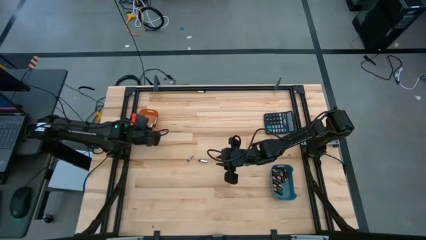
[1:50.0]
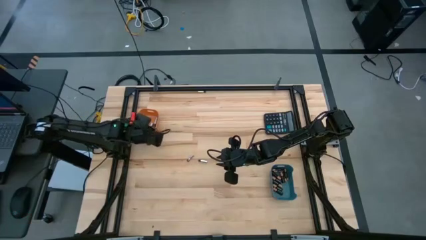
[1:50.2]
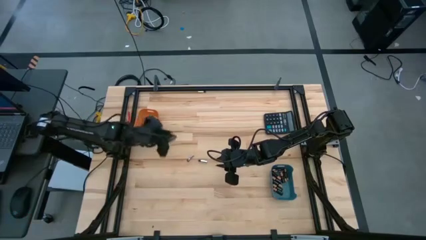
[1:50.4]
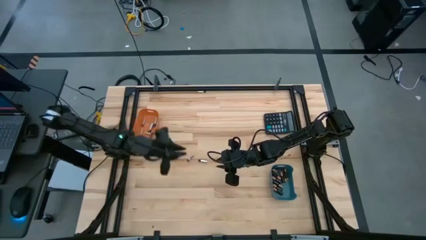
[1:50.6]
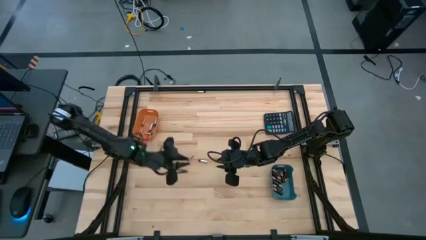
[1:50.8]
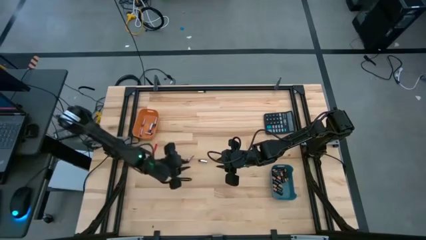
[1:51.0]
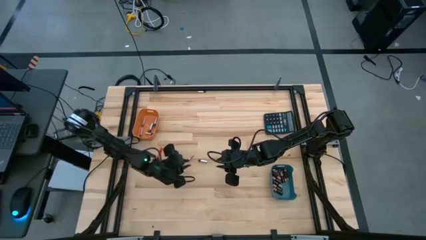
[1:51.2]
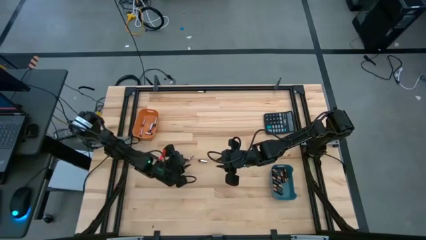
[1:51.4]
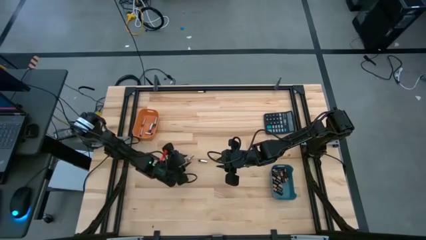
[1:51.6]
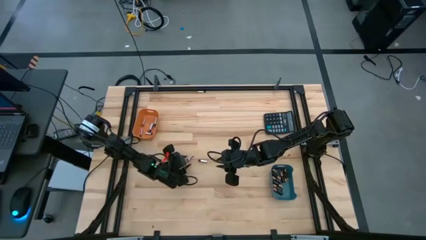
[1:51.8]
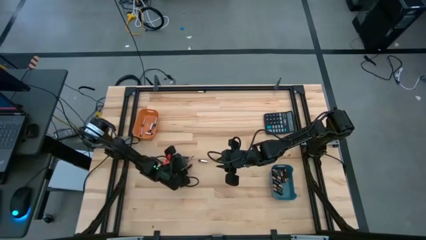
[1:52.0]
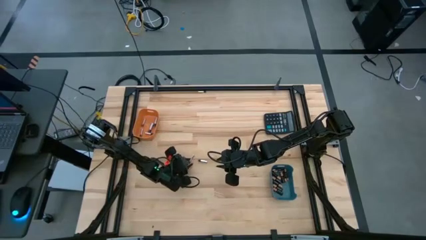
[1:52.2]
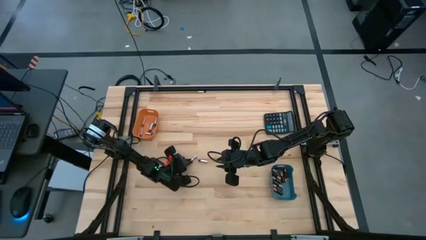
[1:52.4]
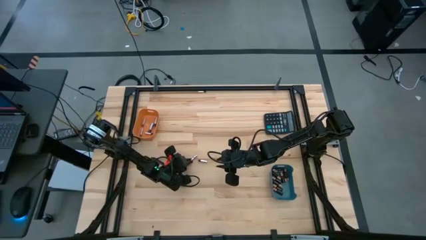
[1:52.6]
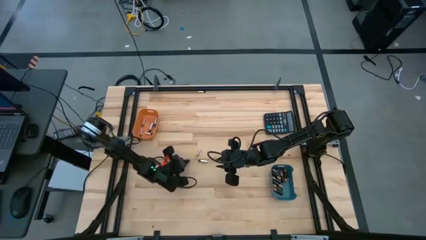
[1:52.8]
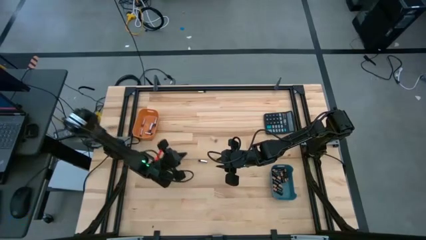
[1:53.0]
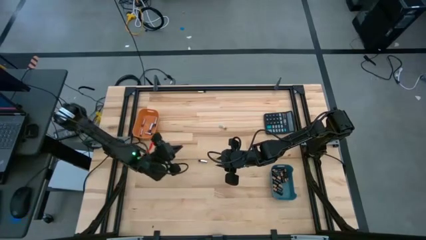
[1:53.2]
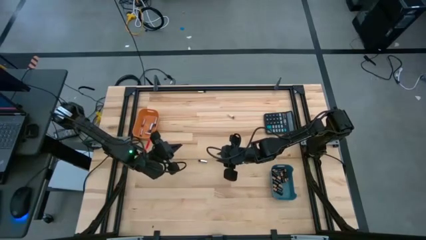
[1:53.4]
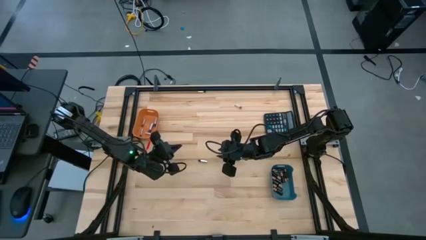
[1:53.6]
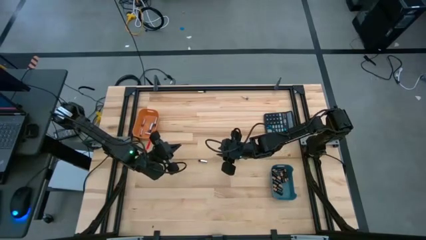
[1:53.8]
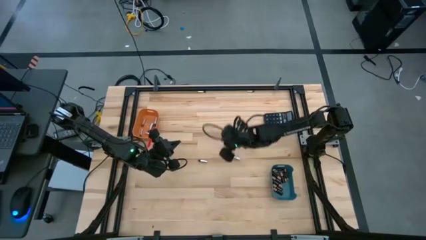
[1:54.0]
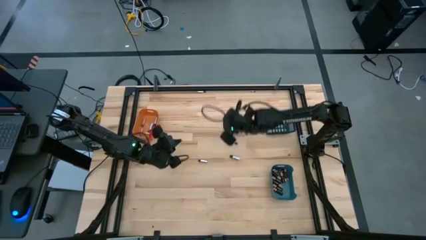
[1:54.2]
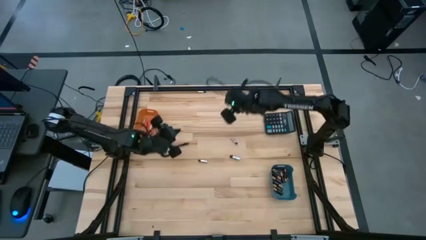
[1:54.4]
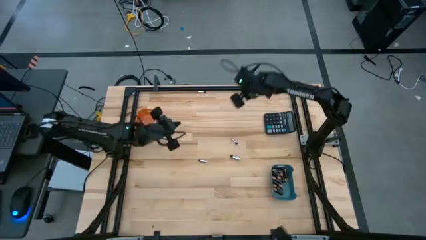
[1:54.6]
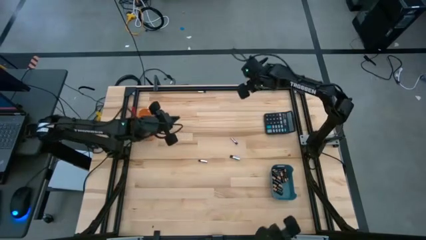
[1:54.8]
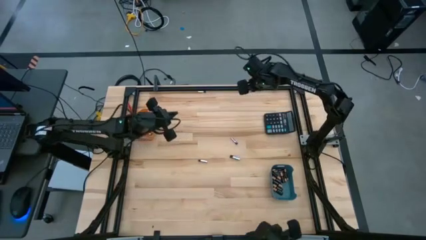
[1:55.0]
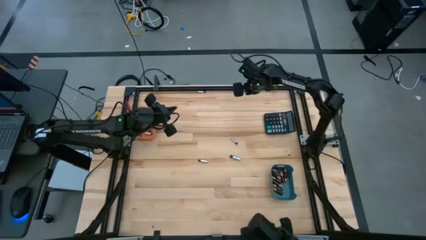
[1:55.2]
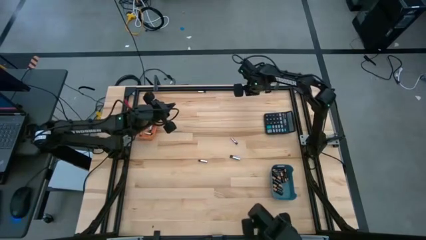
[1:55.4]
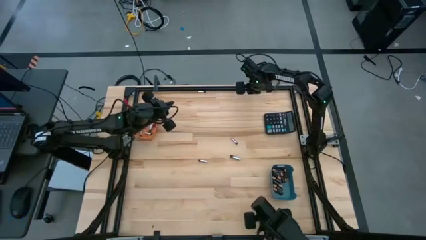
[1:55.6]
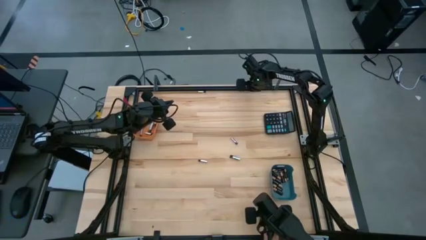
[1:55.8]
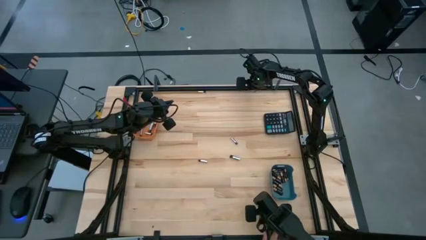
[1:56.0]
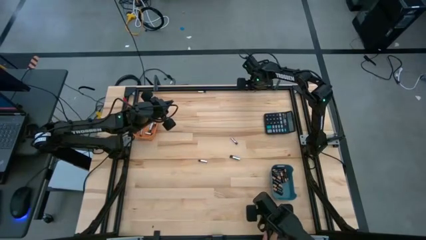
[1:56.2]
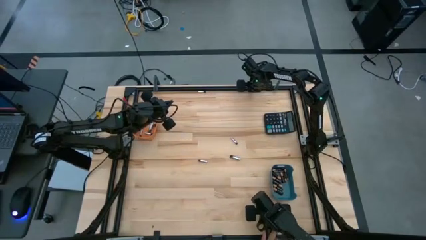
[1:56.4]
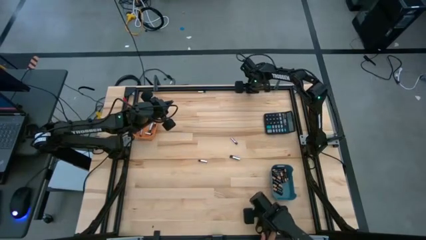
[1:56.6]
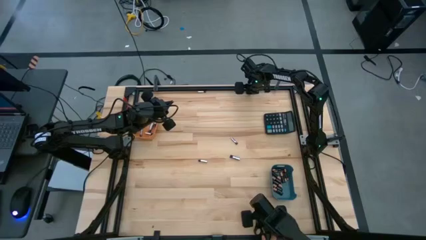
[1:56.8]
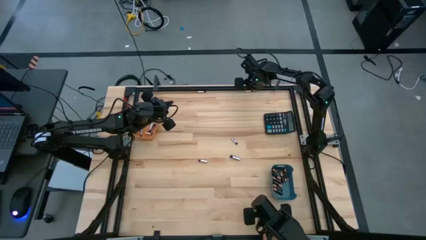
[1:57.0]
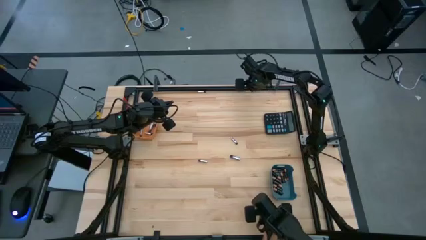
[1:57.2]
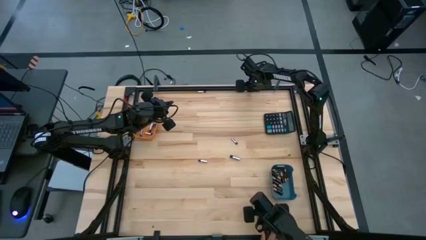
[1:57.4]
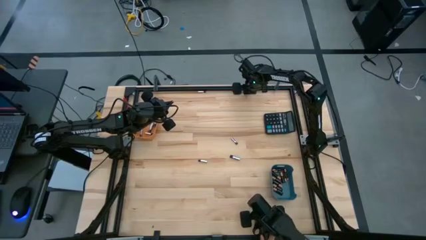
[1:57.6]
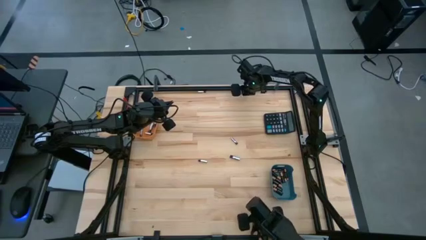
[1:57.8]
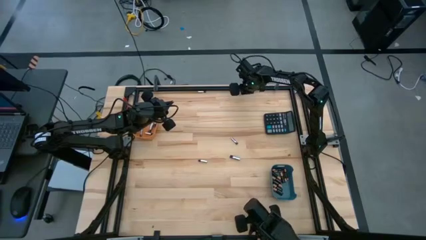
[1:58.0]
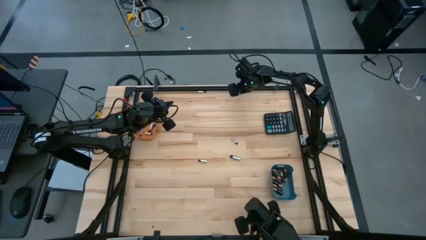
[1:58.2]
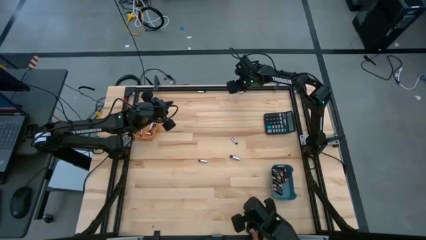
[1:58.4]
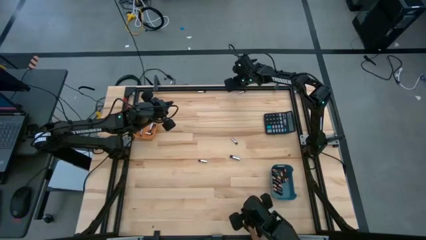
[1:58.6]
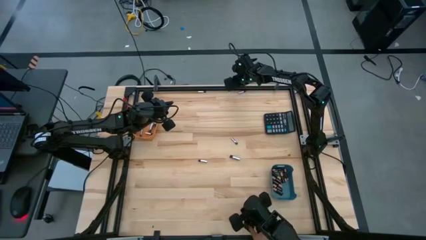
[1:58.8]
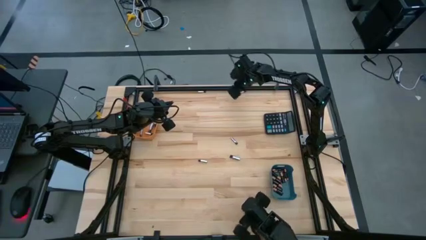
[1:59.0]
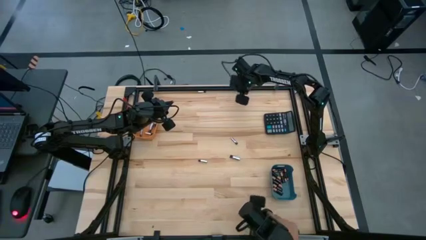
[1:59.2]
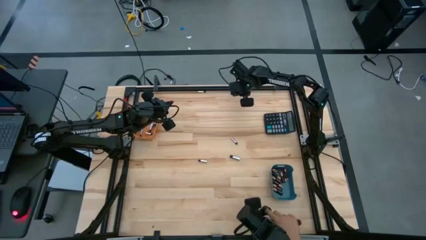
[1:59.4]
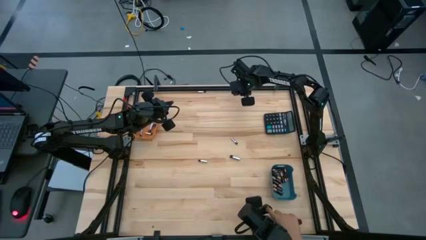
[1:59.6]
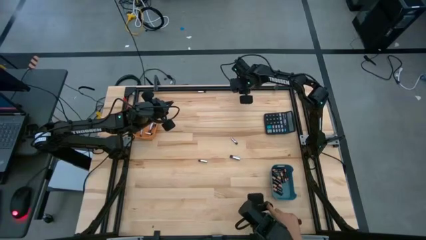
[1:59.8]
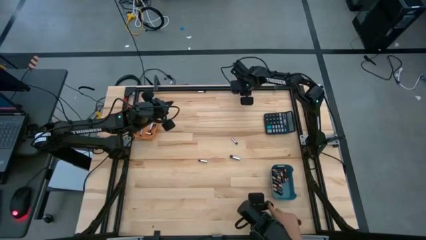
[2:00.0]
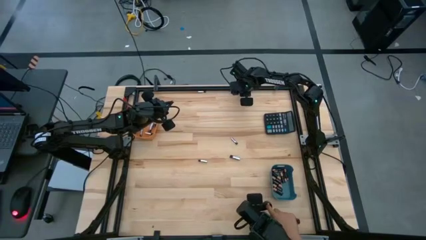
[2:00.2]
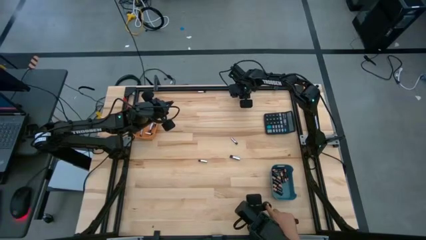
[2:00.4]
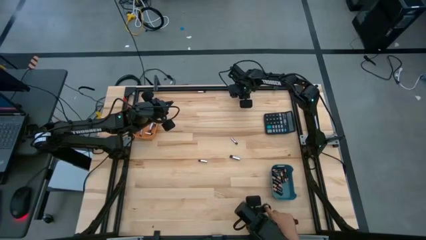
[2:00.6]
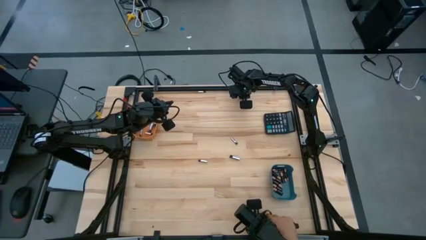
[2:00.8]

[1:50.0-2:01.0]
Task: Sort batteries
Put the silver battery into the orange bin

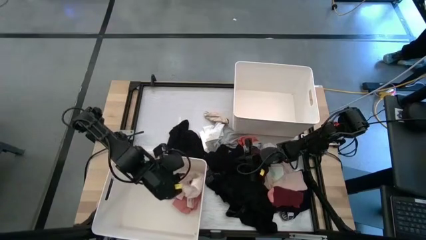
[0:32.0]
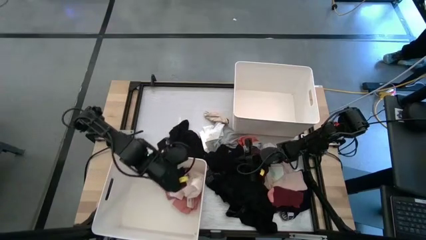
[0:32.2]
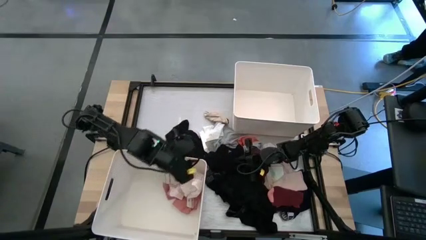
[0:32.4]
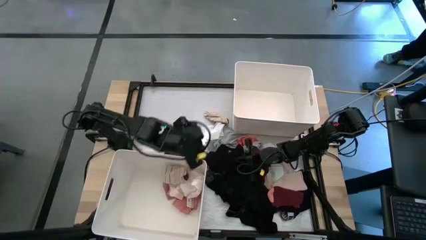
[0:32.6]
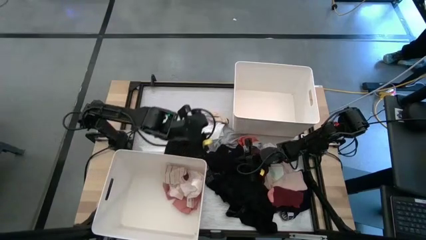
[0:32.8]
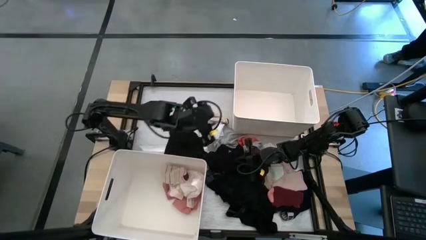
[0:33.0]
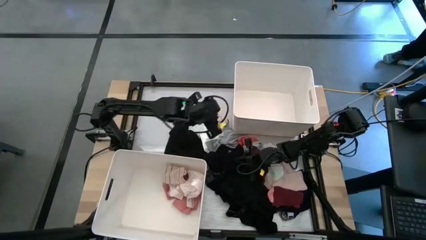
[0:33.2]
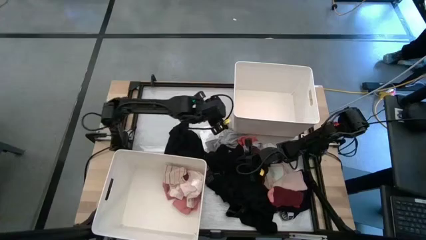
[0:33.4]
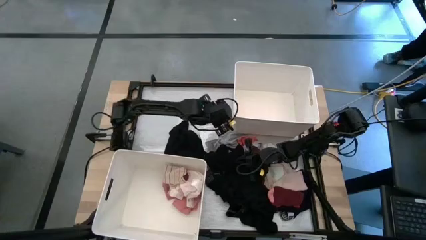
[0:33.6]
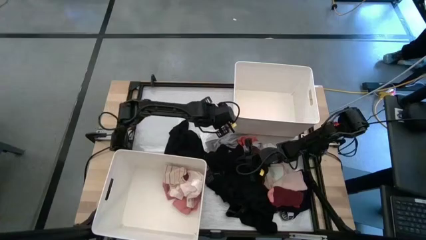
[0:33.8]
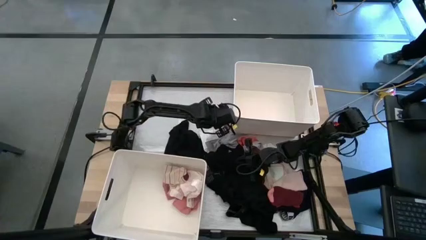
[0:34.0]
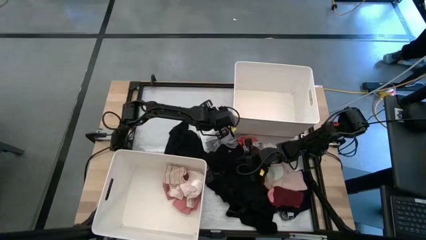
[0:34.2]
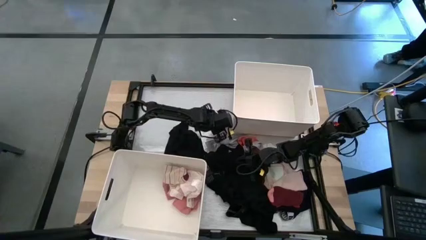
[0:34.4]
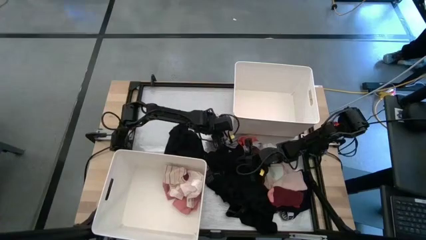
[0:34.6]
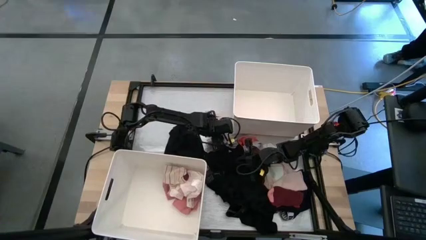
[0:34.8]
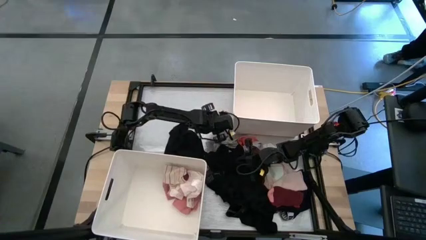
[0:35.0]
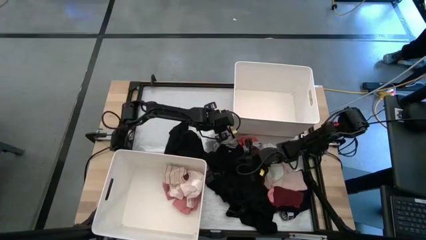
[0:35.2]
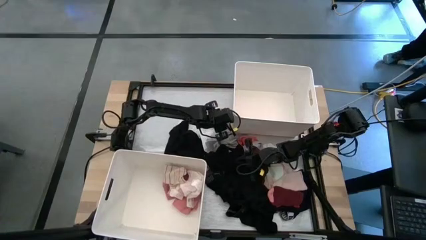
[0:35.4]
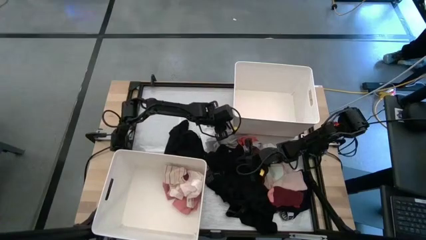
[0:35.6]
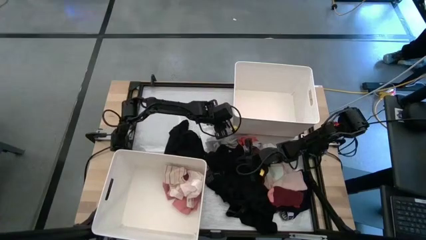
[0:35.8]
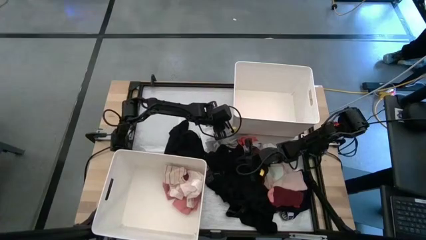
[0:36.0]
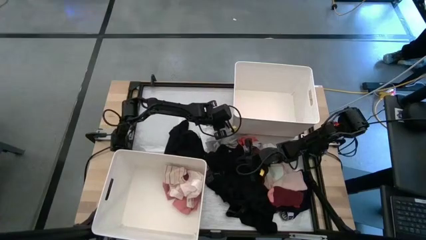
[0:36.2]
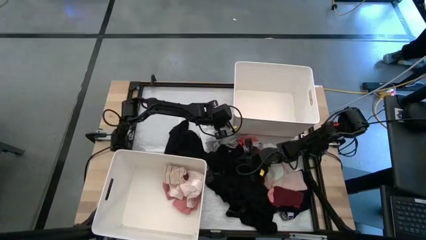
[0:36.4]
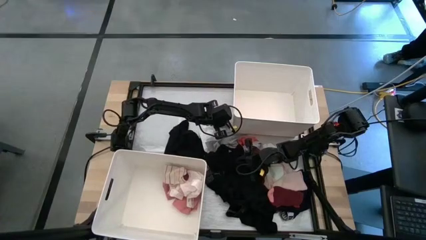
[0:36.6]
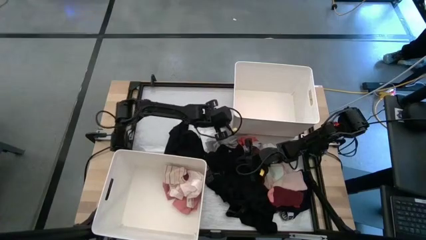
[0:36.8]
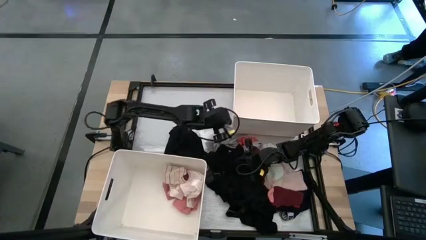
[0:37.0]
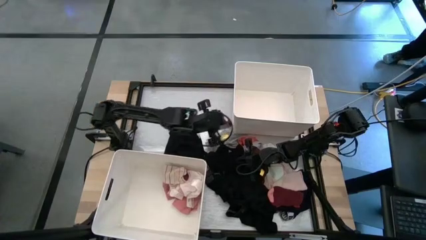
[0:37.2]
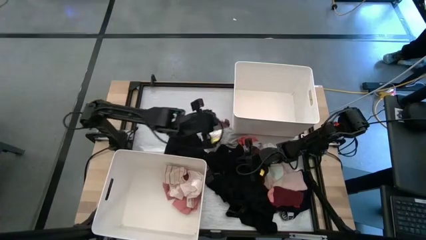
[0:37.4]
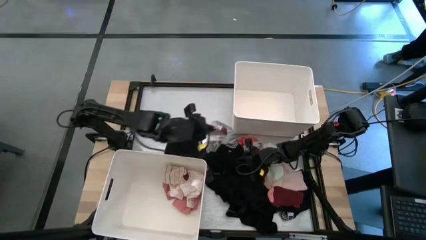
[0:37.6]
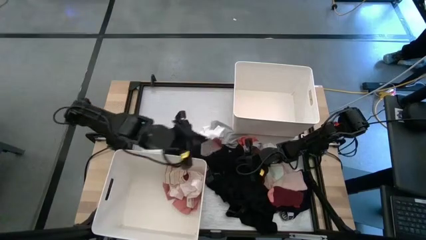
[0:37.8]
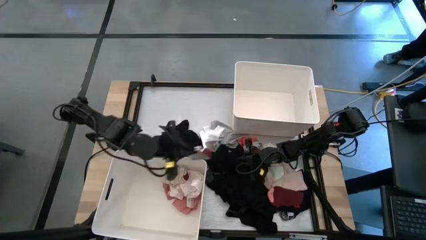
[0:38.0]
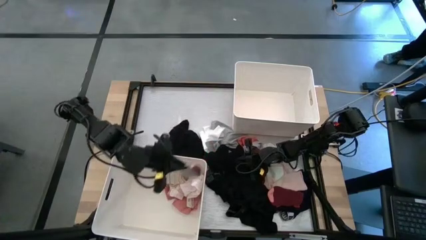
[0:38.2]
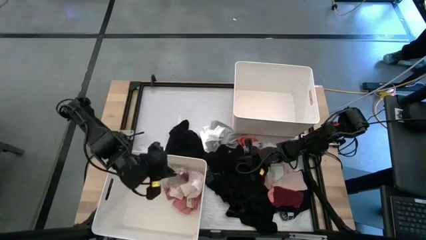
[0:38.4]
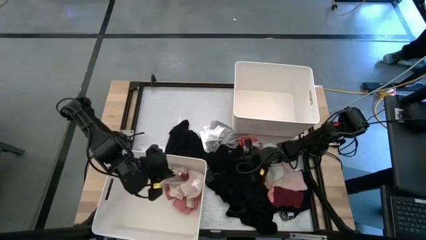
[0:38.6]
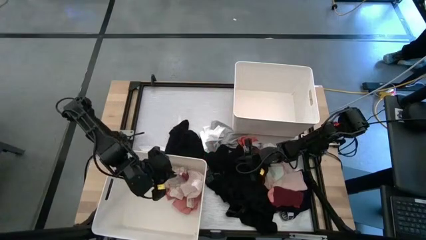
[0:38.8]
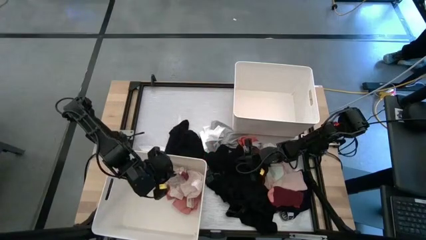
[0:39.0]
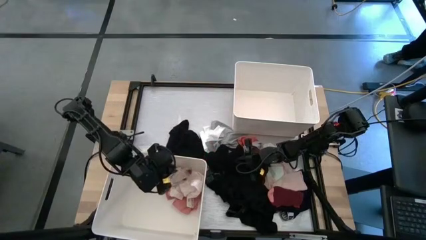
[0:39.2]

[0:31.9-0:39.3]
Task: Sort clothes
Put the stripe sock into the bottom white bin
